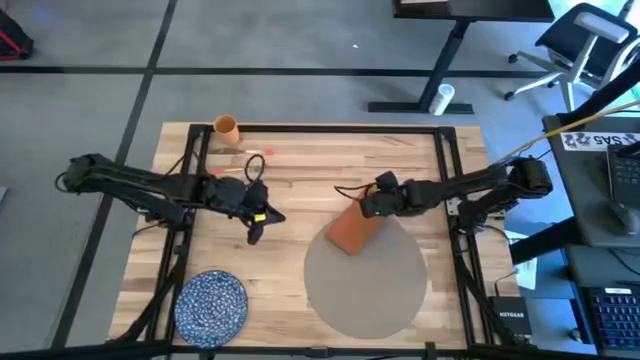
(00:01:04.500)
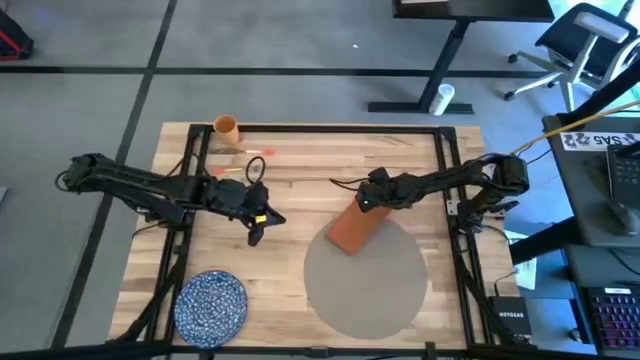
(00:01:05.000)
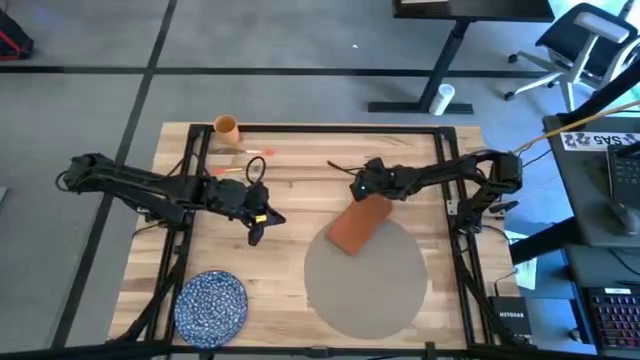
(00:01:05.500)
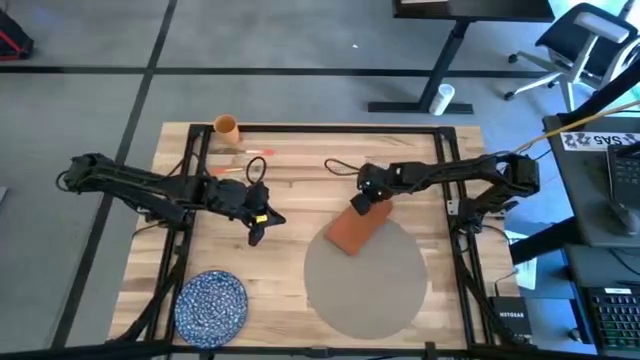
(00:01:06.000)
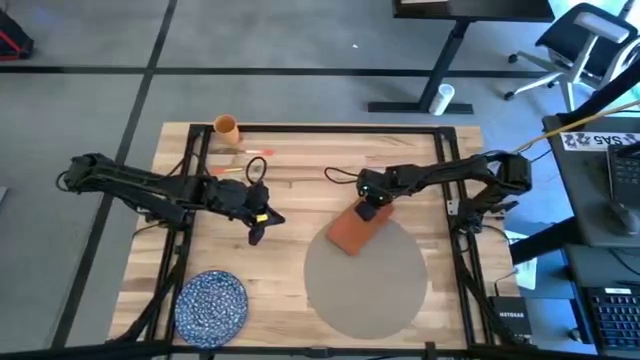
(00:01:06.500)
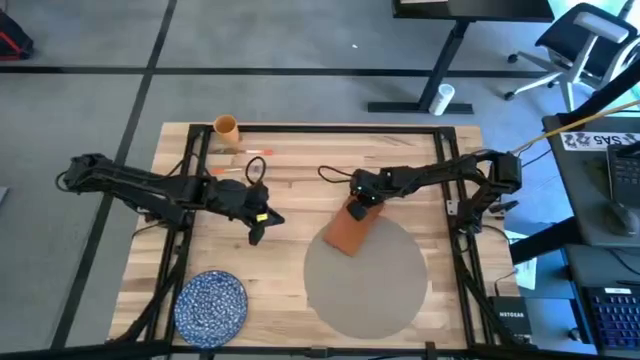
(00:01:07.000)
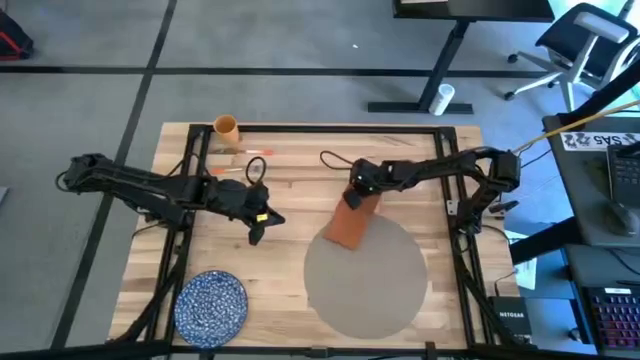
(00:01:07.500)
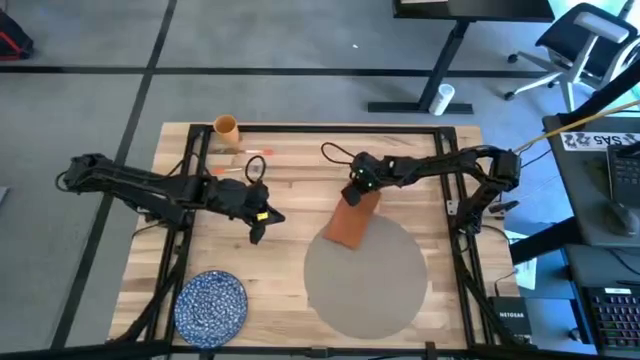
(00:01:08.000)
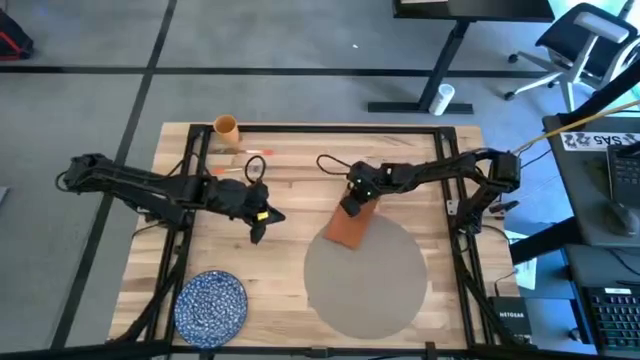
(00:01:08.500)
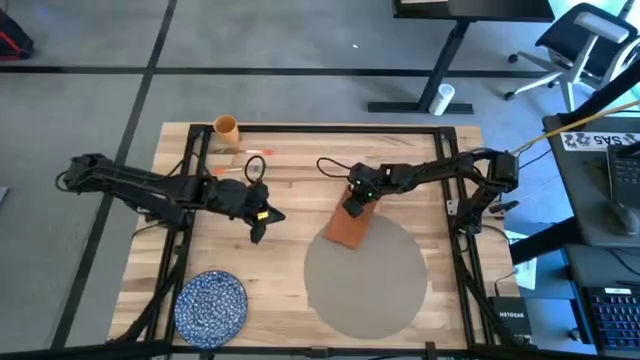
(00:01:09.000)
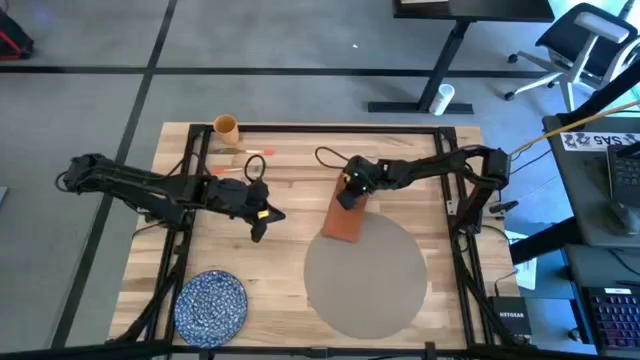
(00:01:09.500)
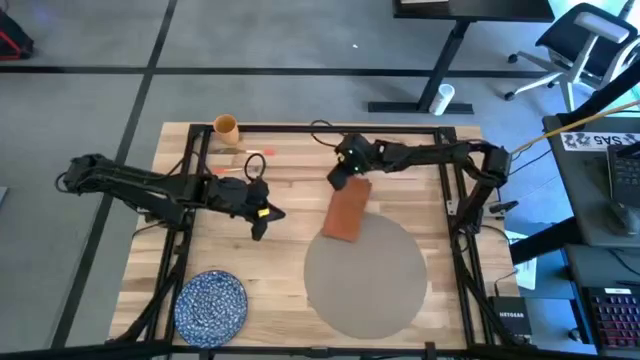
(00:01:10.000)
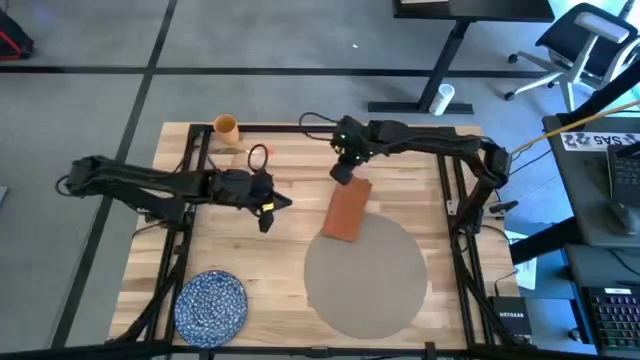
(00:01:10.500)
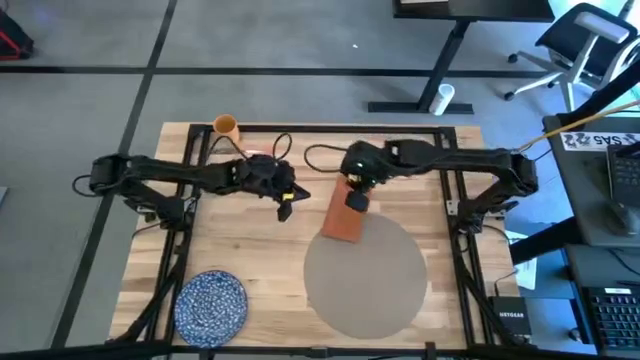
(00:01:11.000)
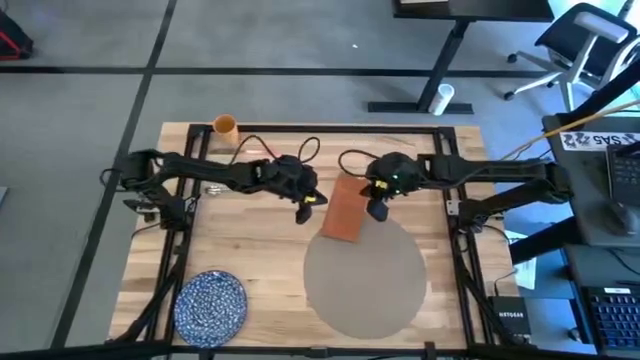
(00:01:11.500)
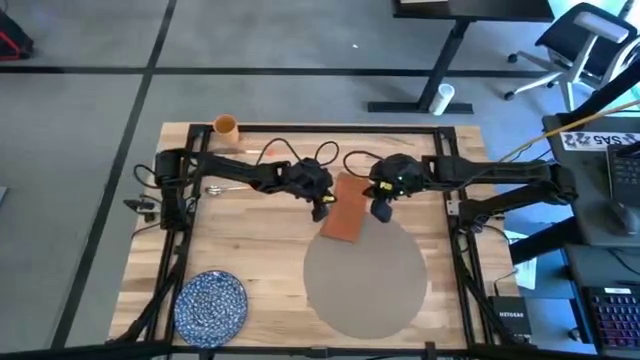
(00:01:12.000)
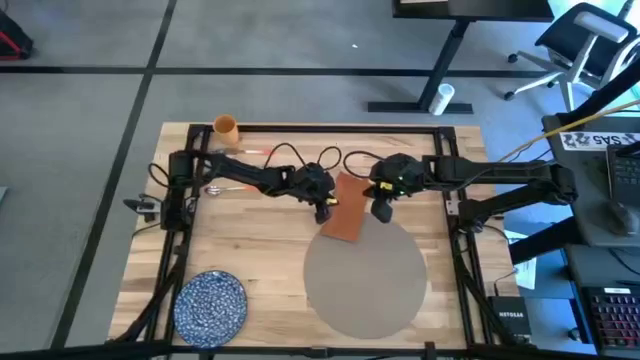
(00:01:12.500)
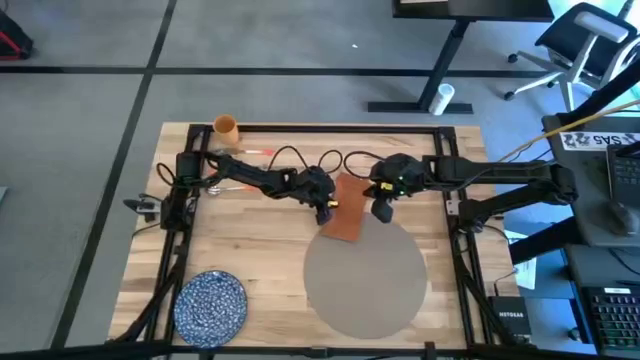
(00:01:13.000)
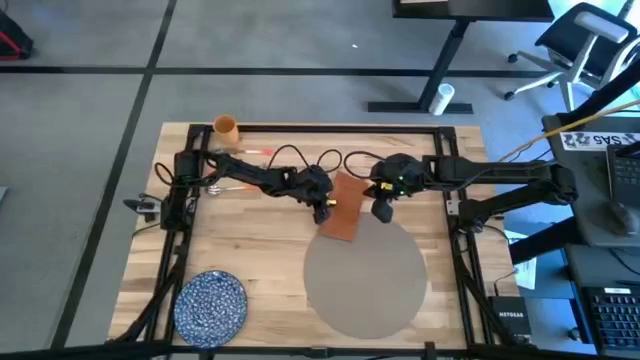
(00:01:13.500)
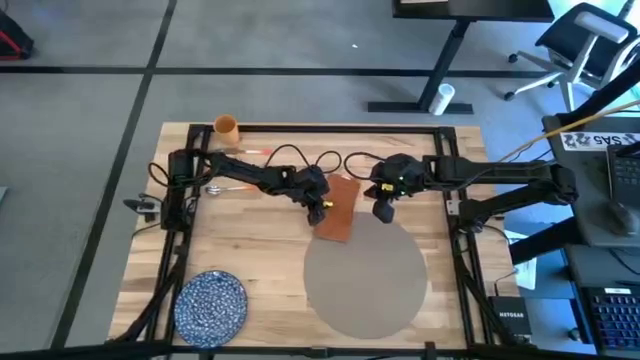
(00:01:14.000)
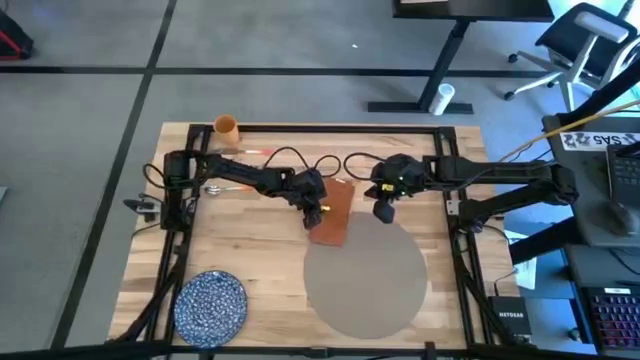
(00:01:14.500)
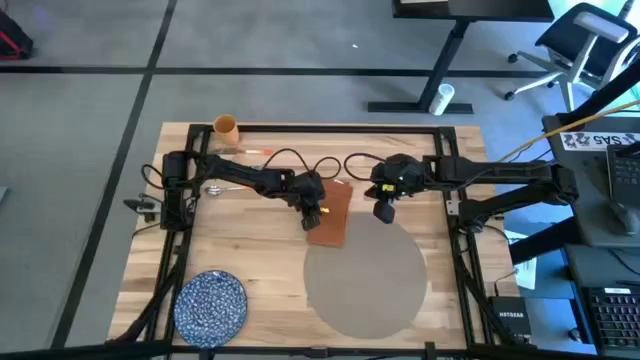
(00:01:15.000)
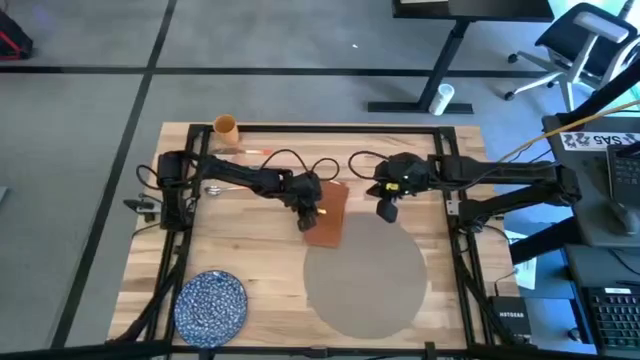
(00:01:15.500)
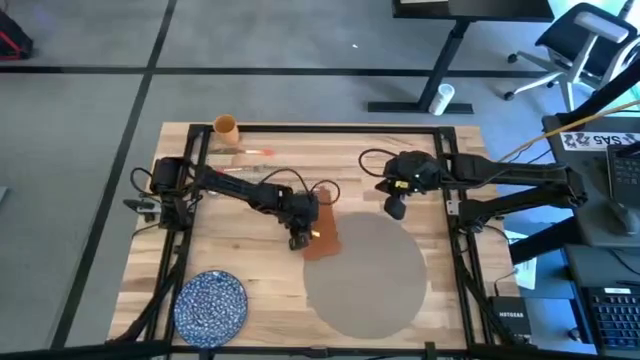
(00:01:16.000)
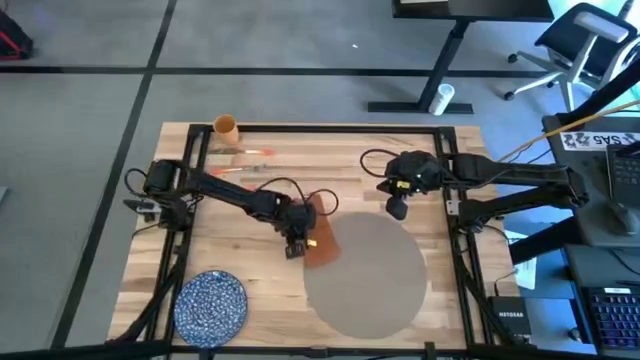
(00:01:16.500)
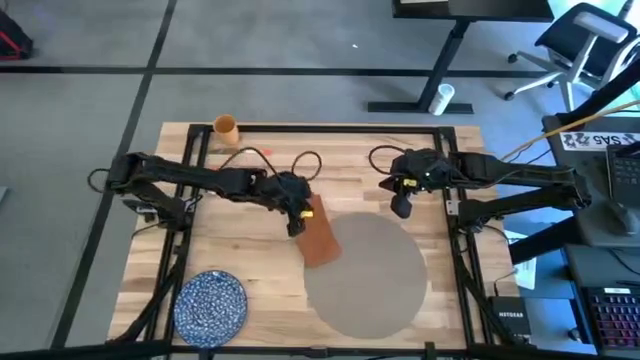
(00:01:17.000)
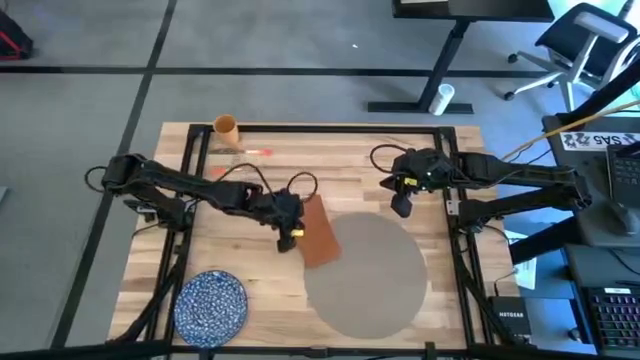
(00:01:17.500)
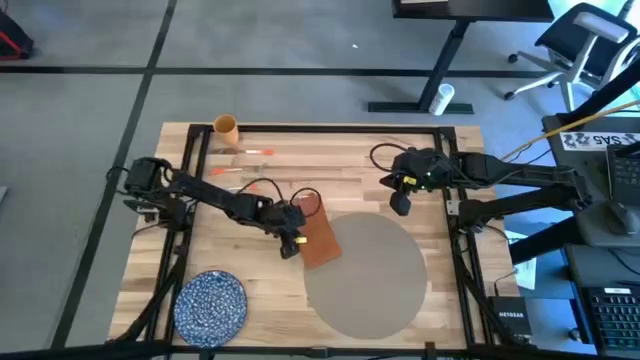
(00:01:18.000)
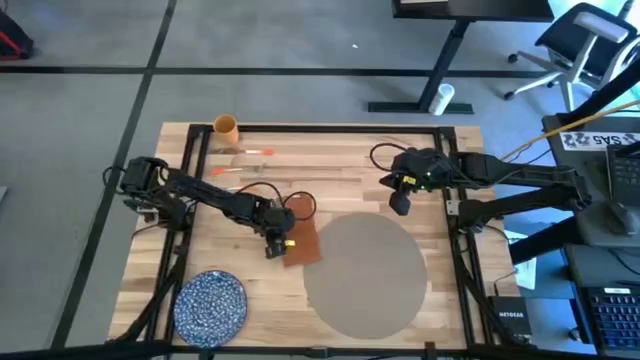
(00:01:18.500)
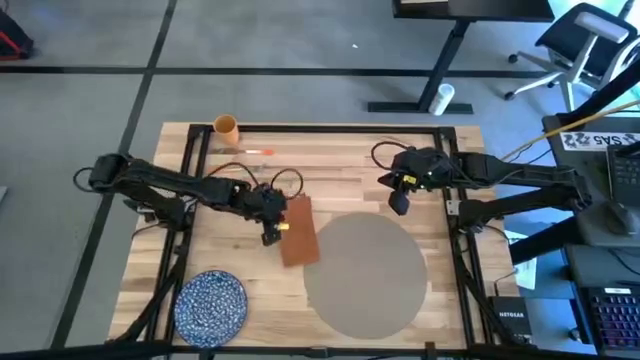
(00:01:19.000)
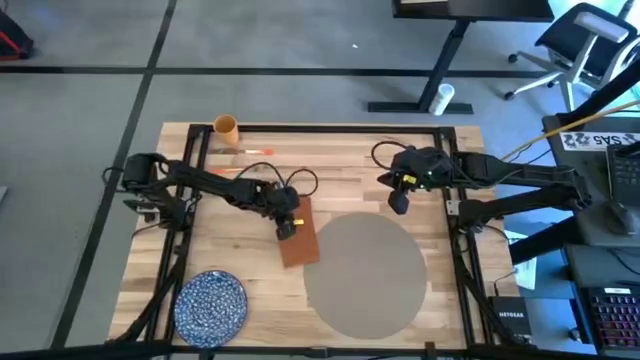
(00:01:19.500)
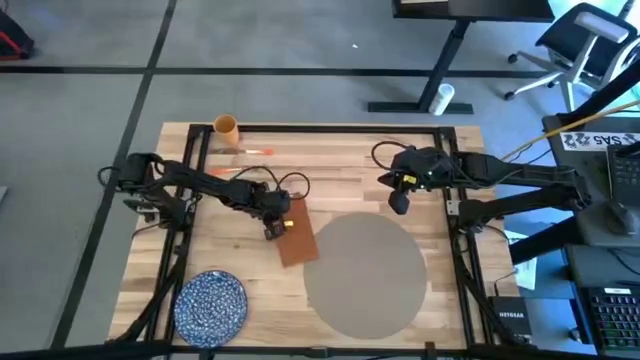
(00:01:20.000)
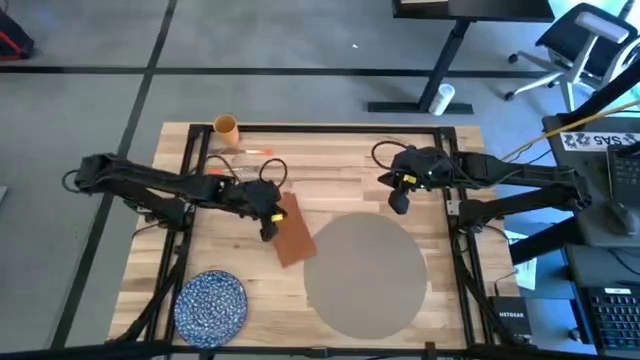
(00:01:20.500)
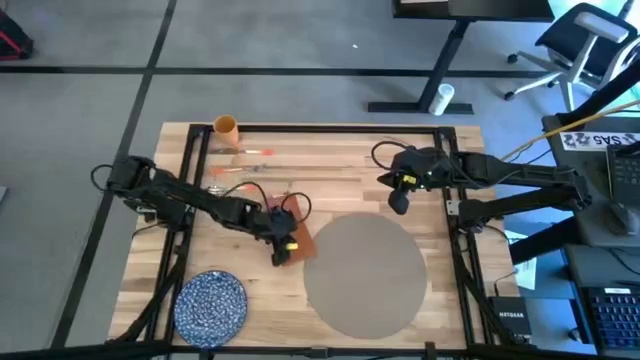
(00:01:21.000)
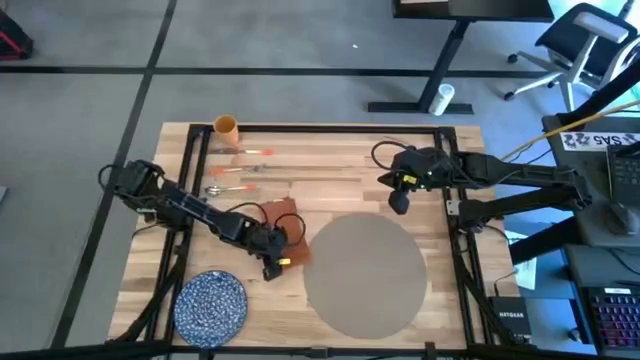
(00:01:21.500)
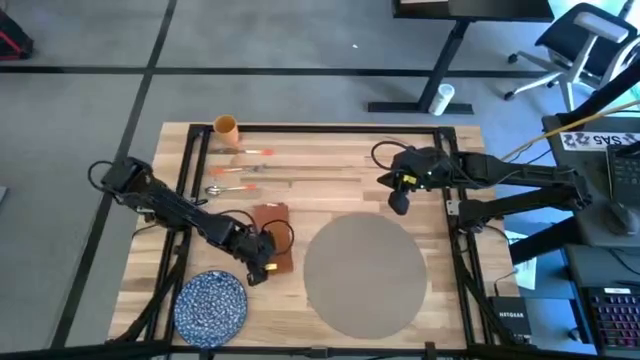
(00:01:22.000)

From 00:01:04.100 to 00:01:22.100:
Task: Set table place
Move the orange napkin to the middle left of the table

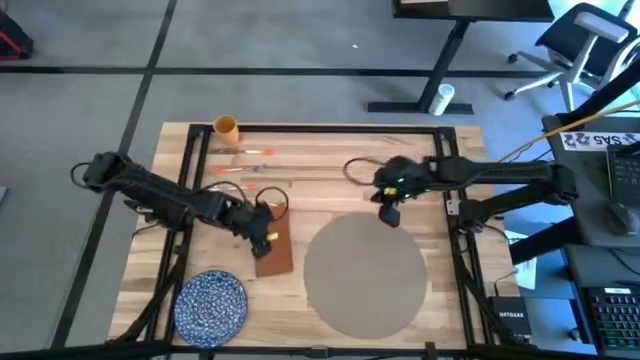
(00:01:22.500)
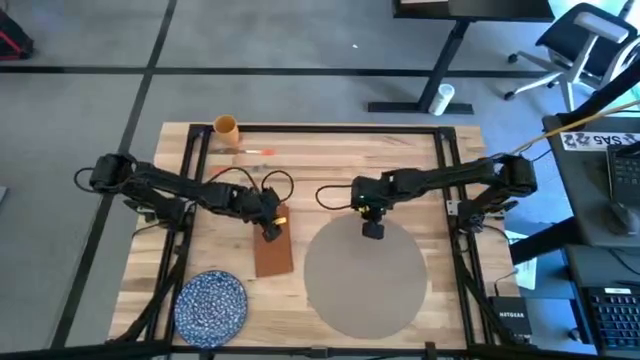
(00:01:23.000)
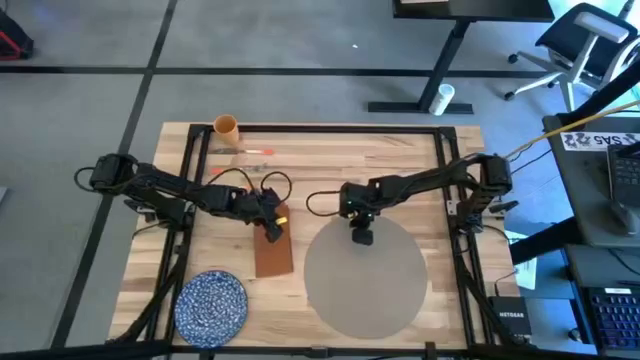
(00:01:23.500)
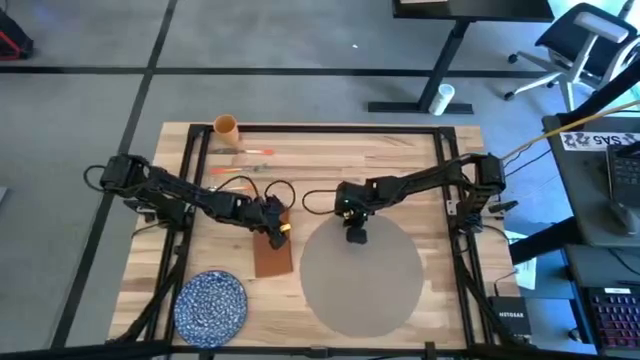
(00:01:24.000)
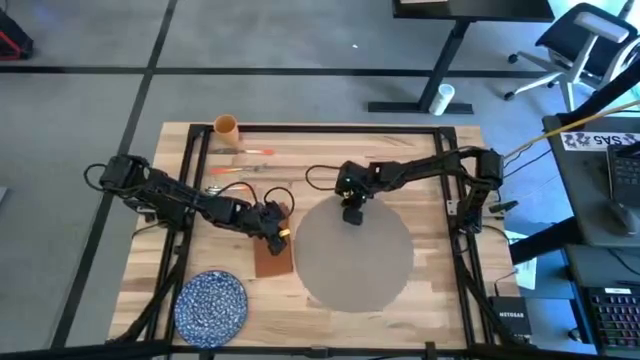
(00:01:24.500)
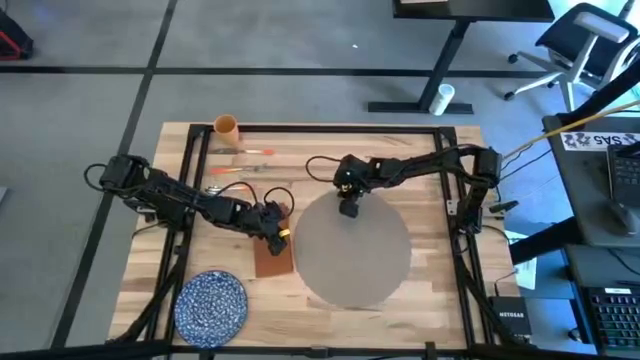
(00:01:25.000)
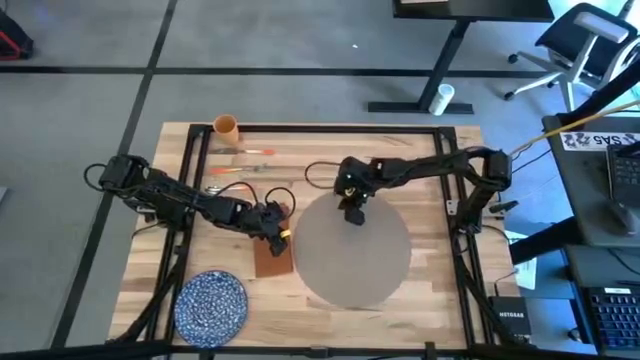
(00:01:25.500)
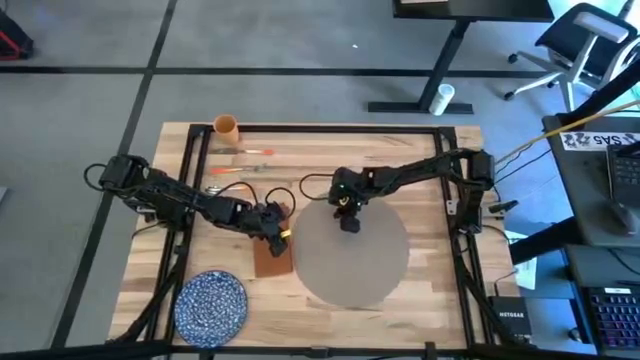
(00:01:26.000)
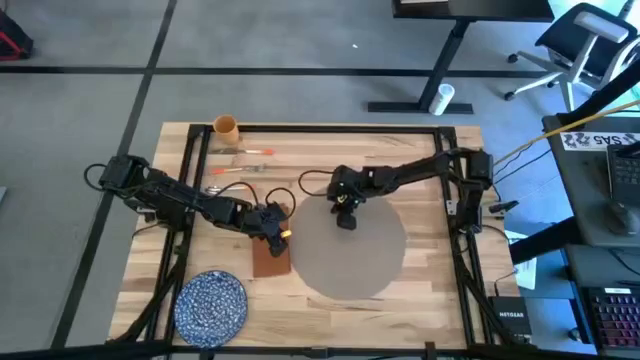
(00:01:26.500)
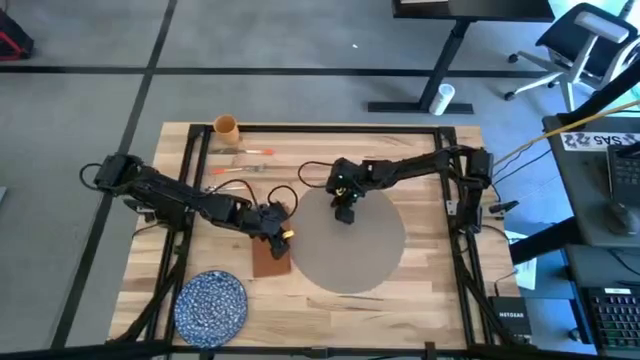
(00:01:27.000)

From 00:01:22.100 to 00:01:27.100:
Move the gray mat to the center of the table
